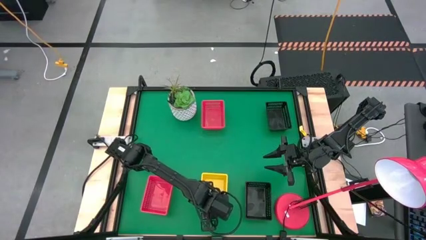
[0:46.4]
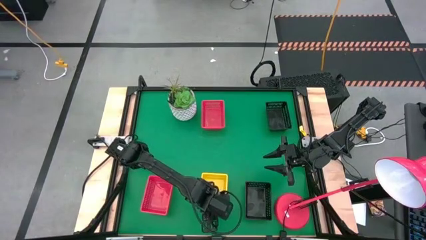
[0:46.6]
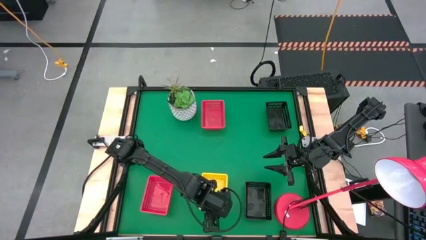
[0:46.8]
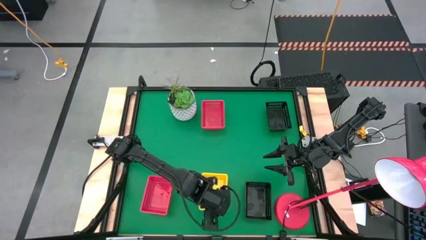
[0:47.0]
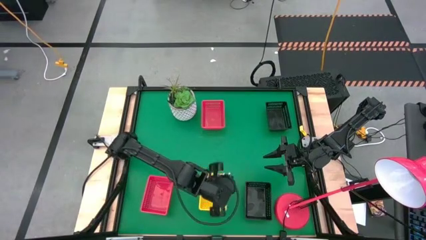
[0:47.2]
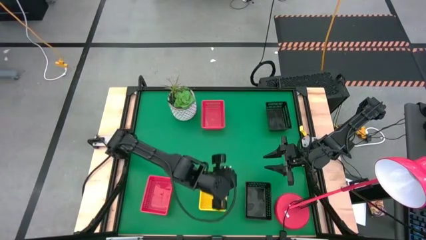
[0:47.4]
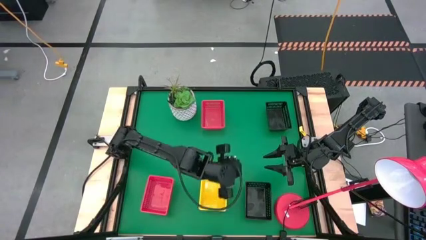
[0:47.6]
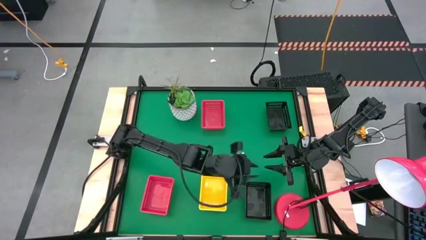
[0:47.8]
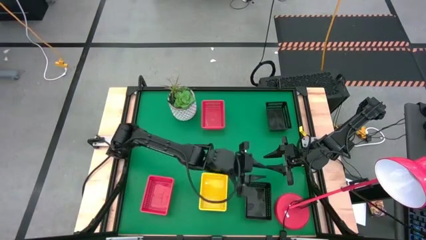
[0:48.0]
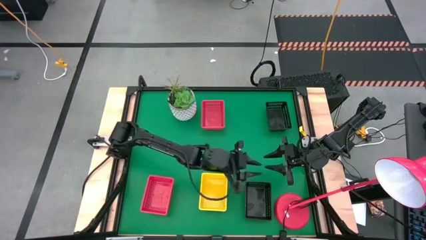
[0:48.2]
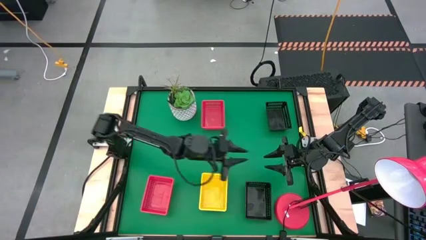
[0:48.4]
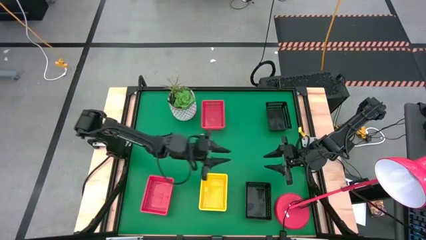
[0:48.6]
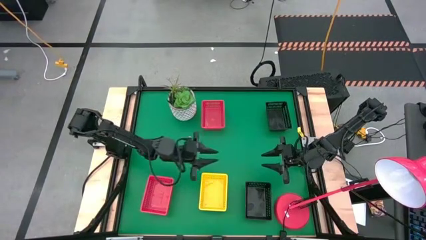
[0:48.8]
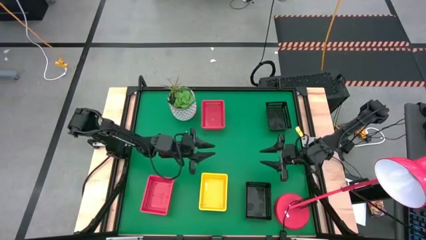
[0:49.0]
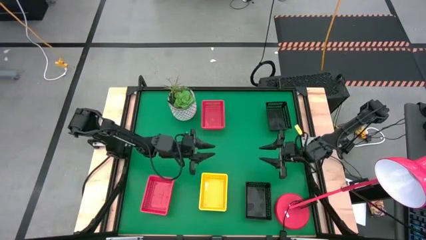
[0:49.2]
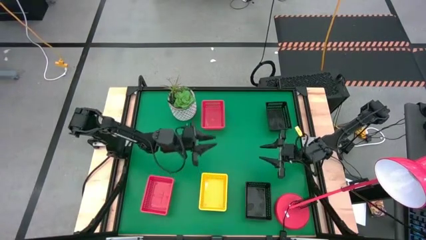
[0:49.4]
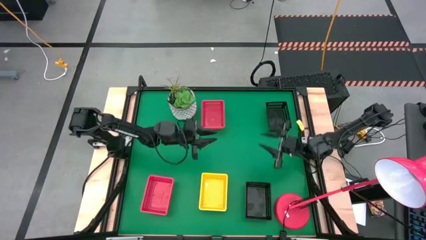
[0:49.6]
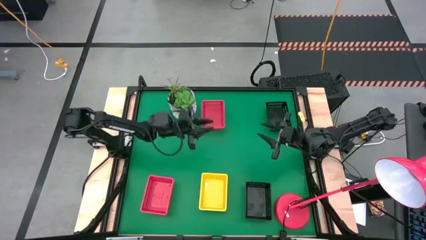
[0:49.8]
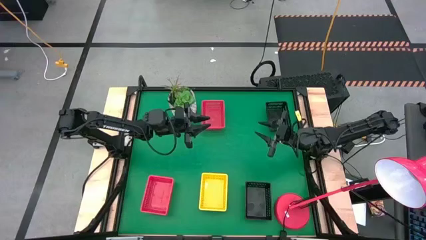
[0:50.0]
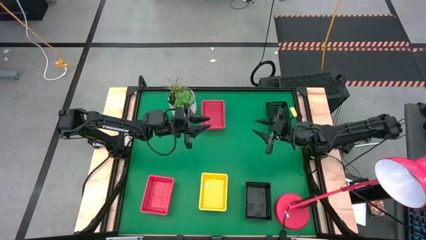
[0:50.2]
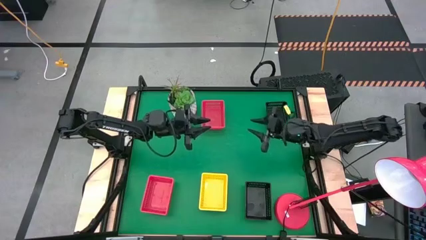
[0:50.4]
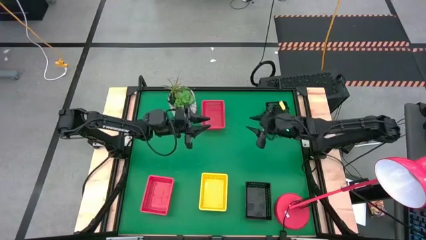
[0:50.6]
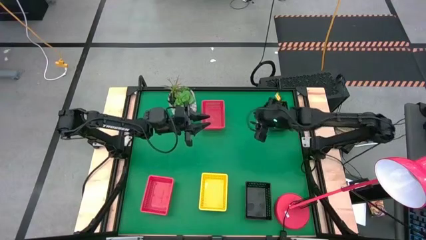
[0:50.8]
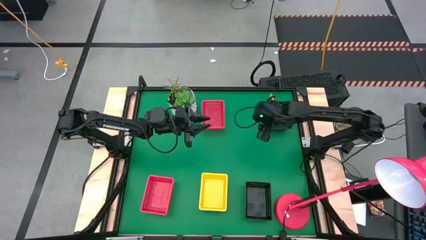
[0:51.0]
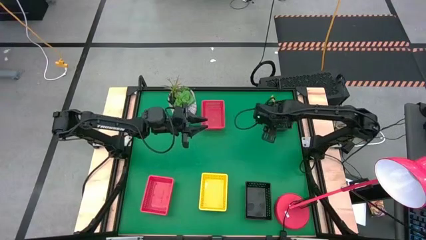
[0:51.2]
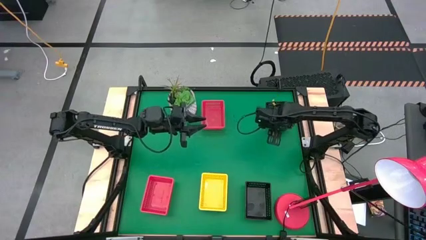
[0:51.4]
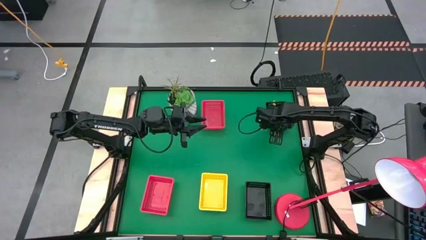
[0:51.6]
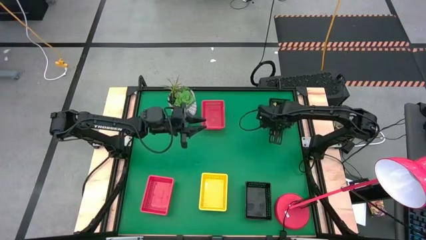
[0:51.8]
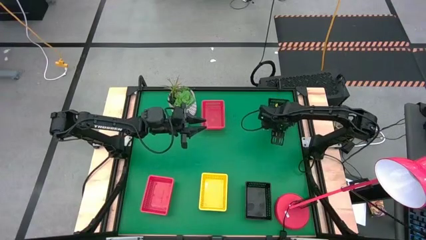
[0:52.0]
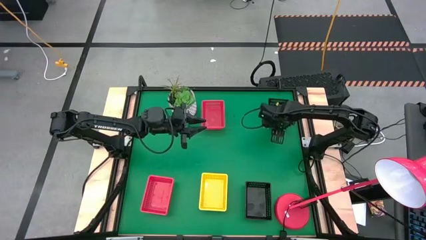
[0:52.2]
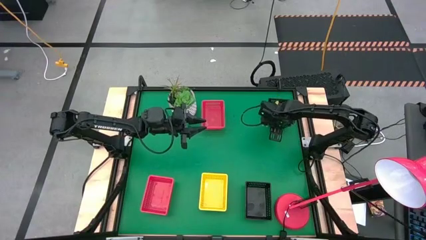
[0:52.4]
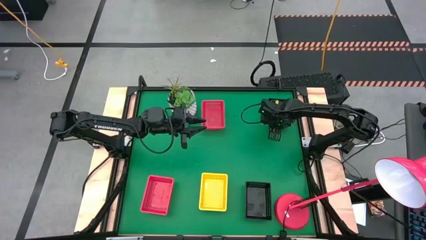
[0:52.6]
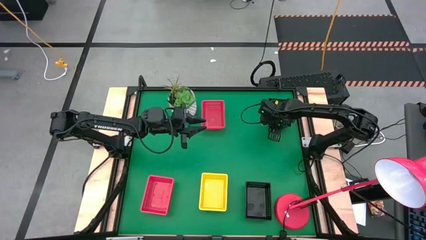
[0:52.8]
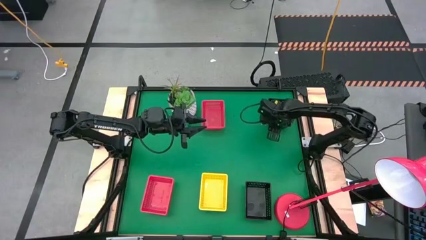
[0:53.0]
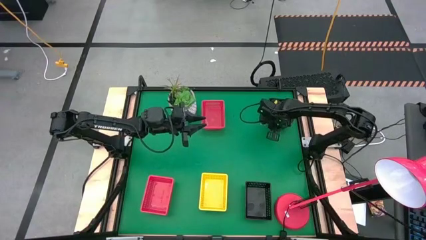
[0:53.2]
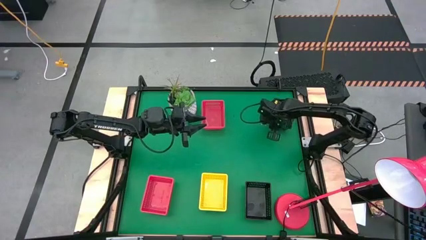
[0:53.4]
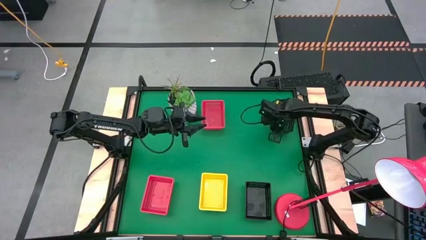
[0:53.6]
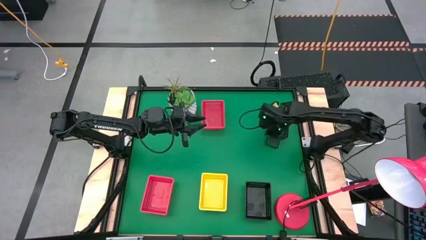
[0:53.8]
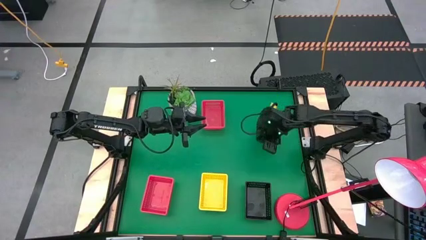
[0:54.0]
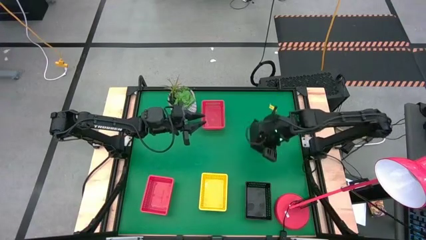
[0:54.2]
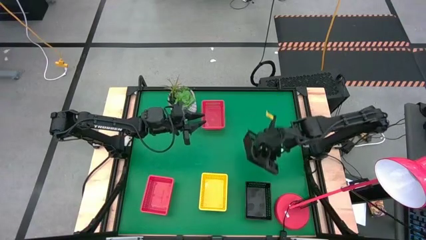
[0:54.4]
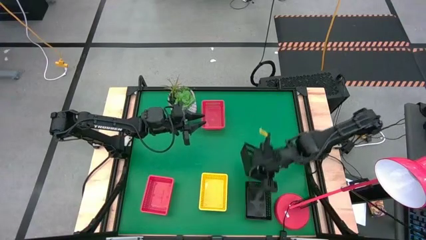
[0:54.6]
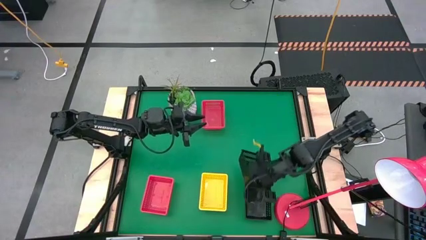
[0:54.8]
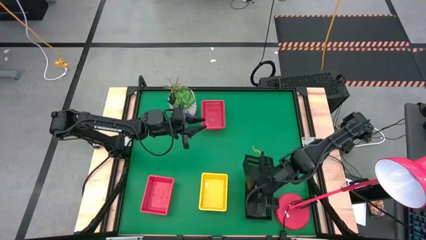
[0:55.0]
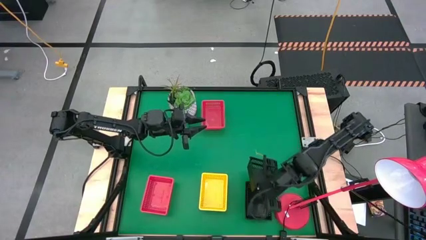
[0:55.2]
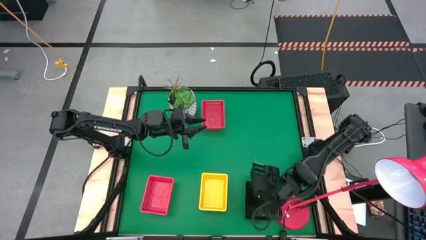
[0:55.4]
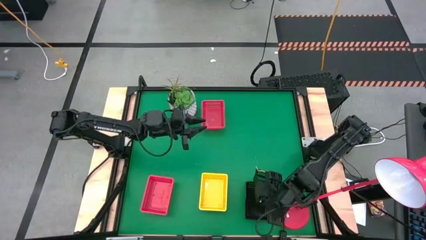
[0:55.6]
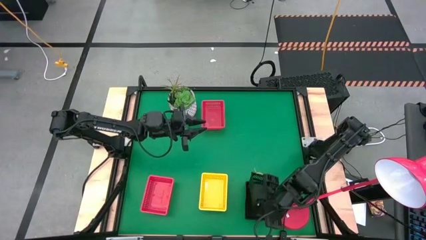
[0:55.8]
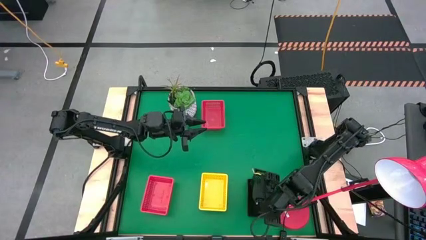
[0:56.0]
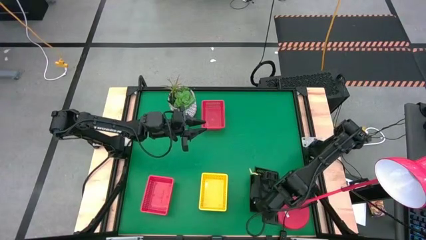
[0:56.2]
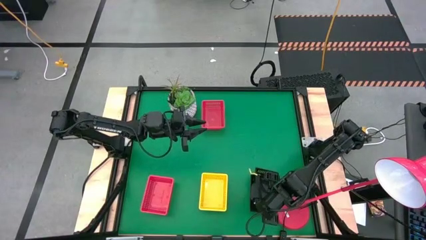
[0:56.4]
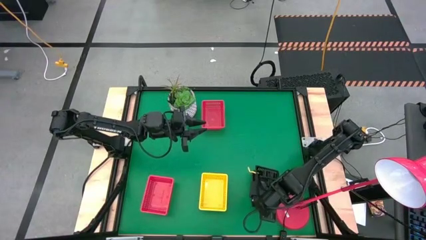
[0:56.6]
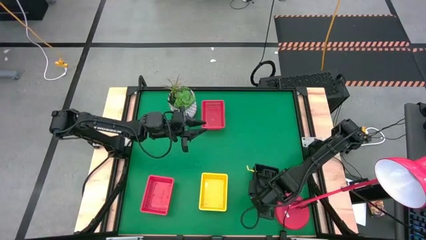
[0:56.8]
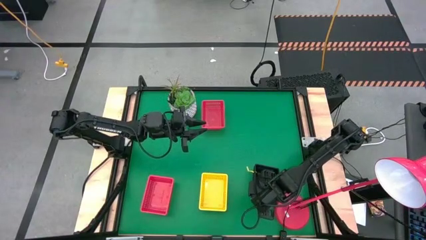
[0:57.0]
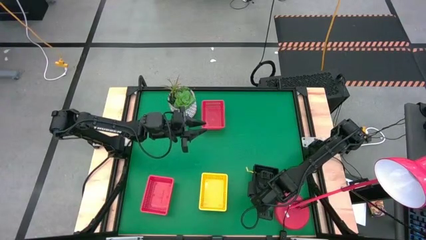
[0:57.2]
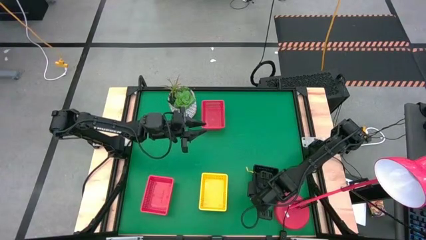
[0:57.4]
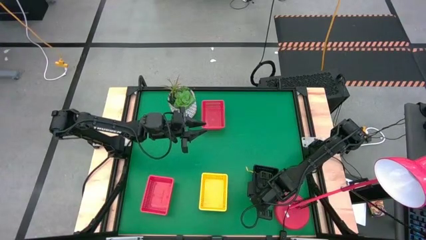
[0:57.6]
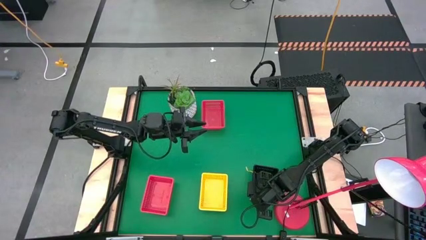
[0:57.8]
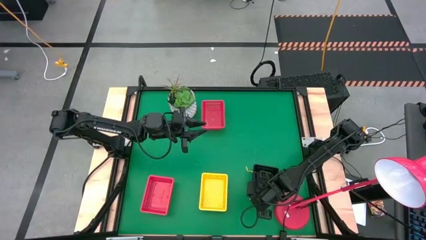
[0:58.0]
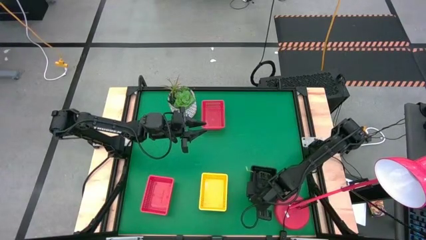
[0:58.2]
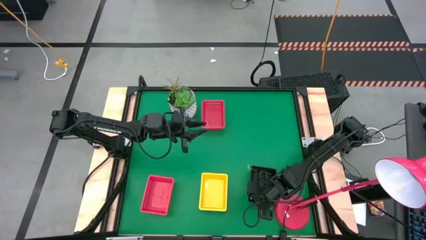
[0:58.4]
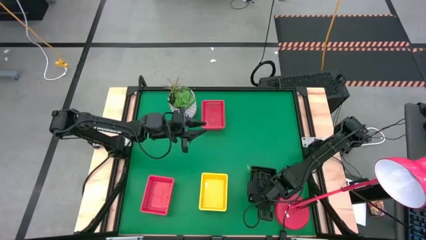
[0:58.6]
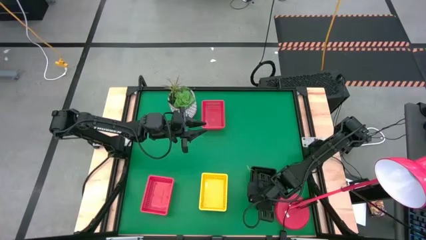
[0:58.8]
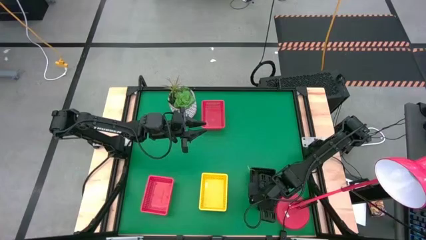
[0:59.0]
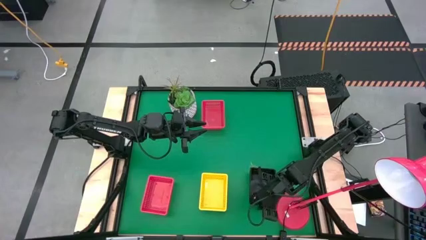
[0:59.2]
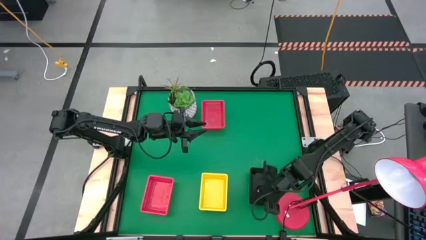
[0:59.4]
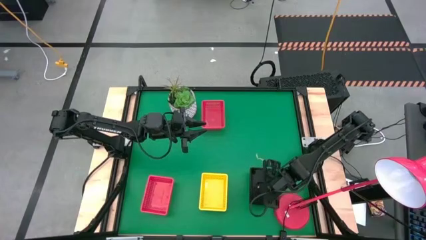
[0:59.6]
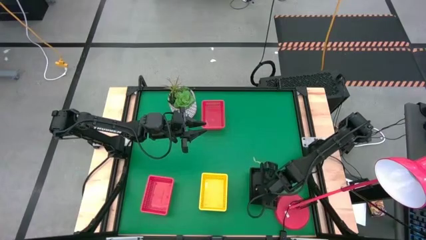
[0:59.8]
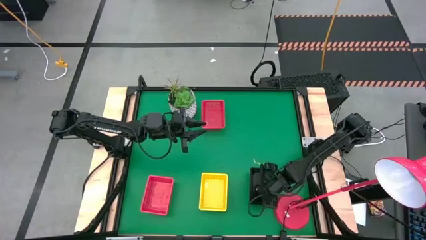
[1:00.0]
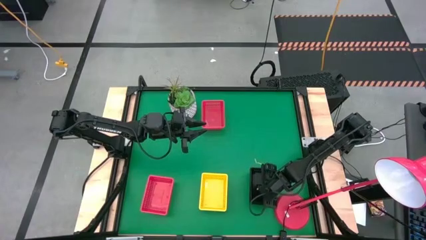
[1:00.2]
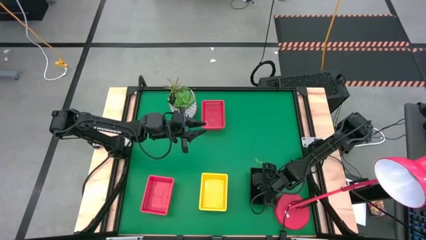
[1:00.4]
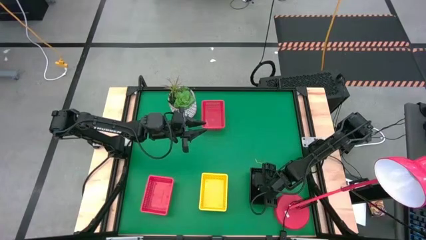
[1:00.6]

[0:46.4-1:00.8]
Stack the top black bin on top of the bottom black bin
